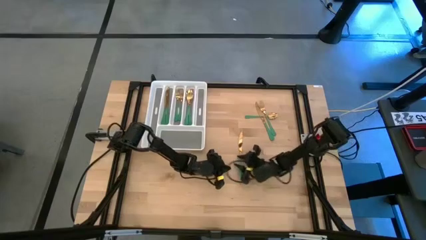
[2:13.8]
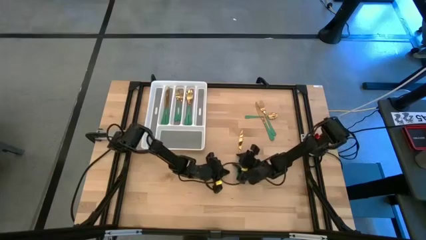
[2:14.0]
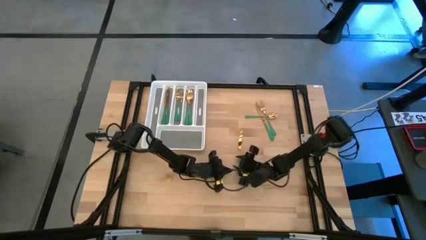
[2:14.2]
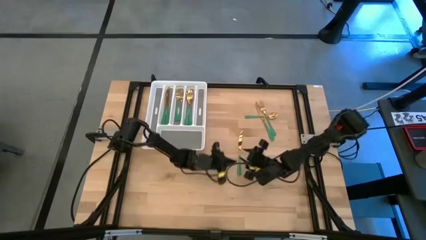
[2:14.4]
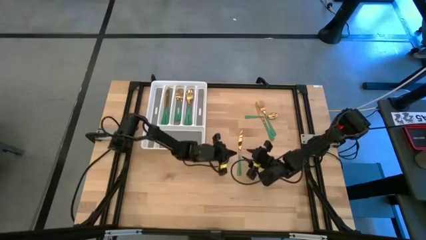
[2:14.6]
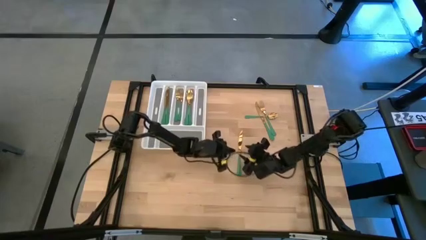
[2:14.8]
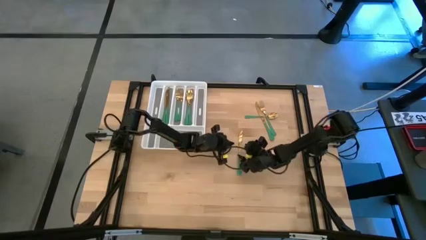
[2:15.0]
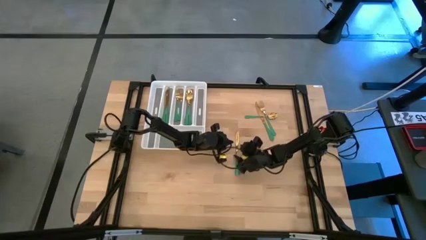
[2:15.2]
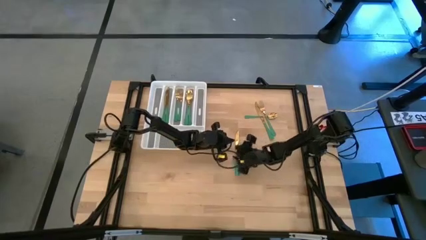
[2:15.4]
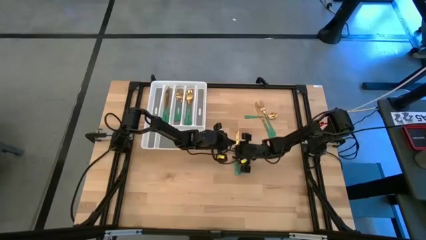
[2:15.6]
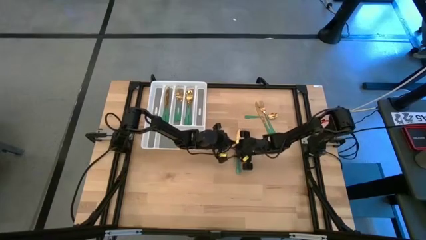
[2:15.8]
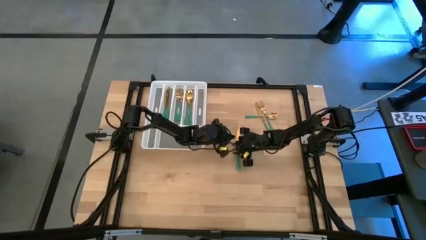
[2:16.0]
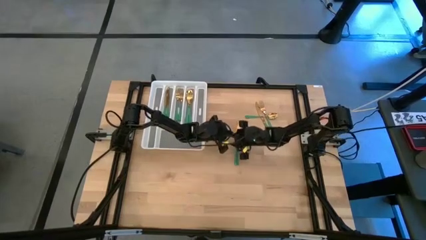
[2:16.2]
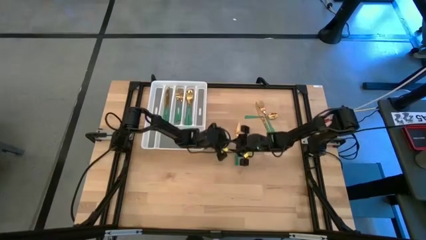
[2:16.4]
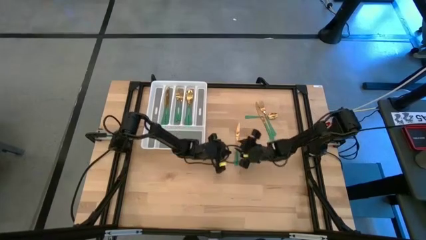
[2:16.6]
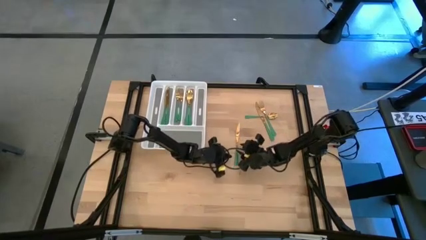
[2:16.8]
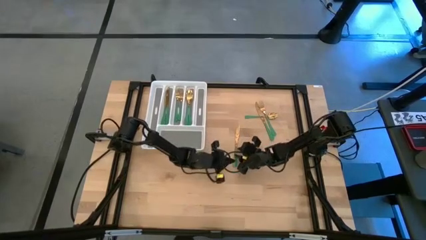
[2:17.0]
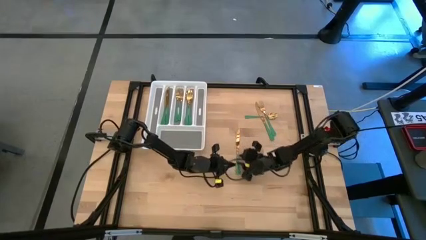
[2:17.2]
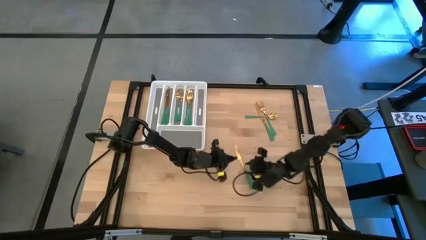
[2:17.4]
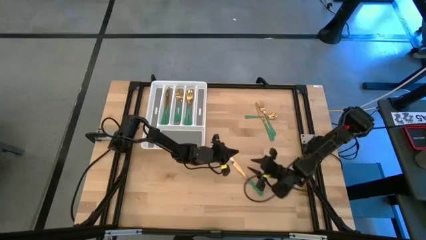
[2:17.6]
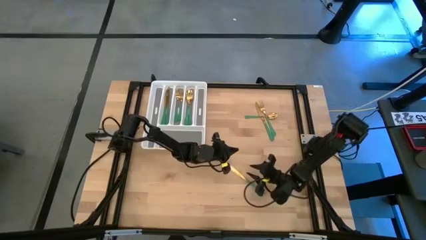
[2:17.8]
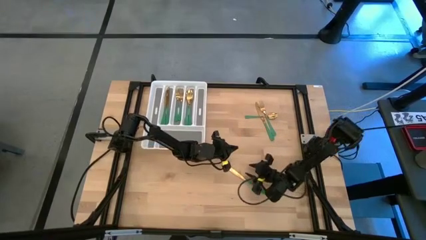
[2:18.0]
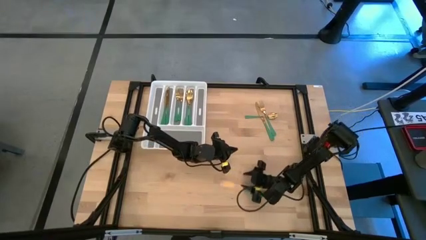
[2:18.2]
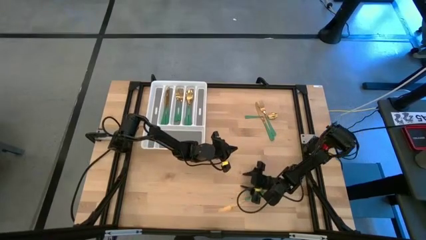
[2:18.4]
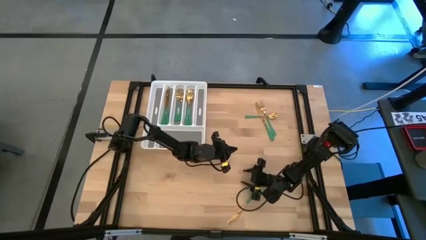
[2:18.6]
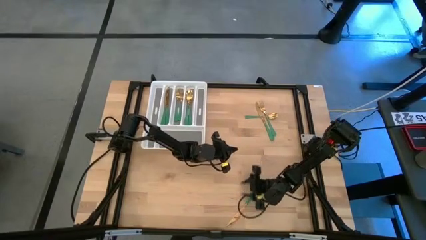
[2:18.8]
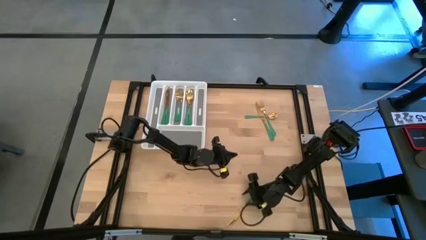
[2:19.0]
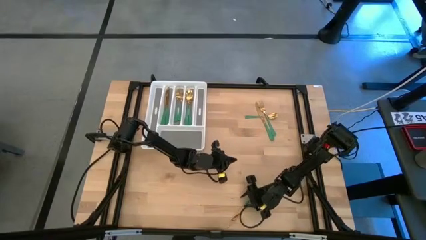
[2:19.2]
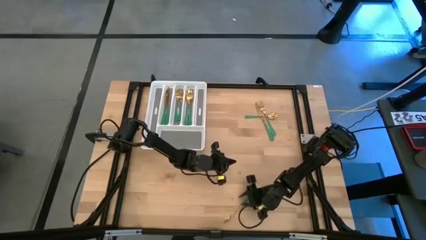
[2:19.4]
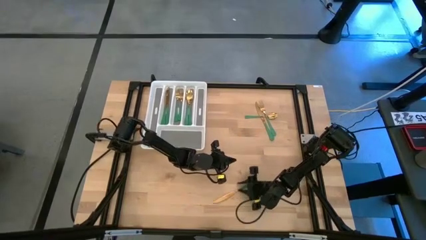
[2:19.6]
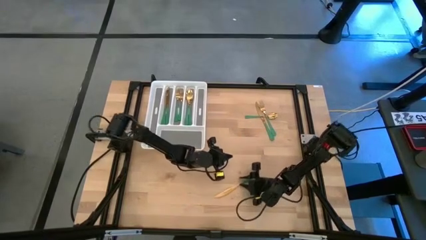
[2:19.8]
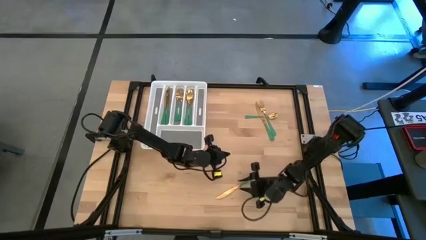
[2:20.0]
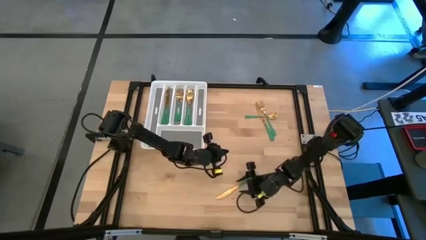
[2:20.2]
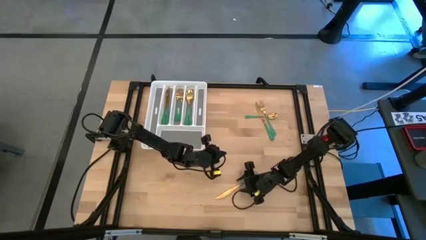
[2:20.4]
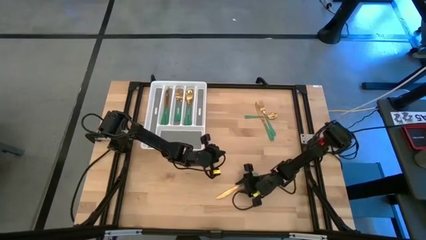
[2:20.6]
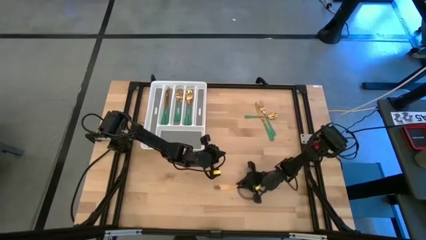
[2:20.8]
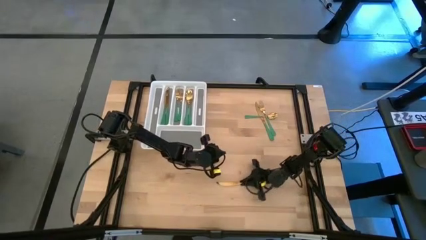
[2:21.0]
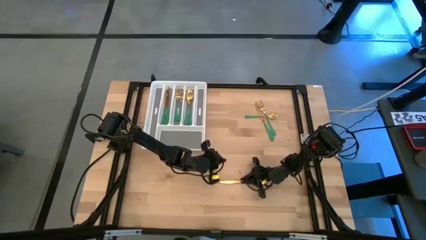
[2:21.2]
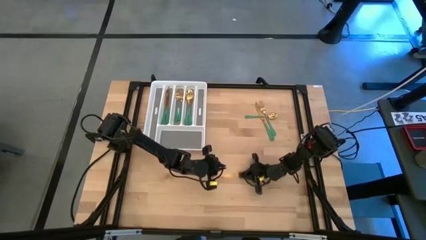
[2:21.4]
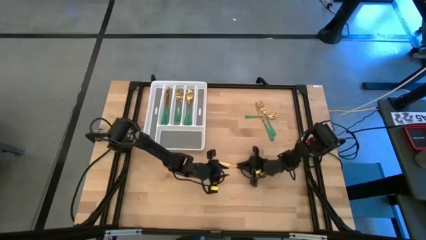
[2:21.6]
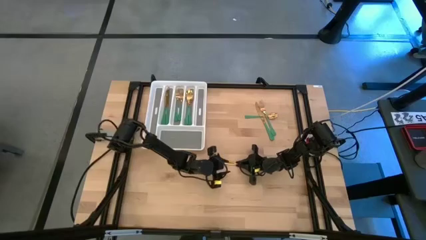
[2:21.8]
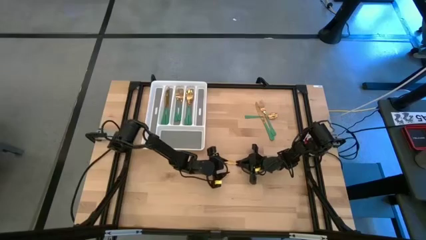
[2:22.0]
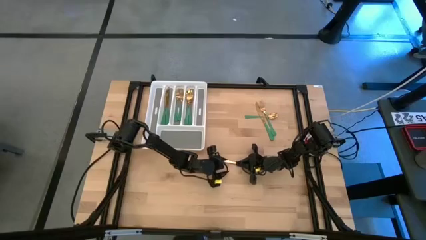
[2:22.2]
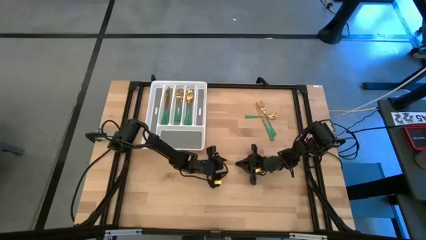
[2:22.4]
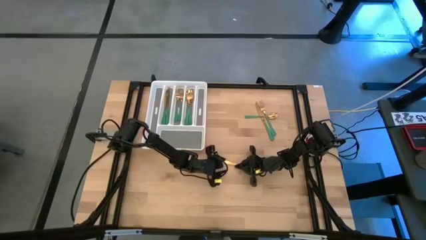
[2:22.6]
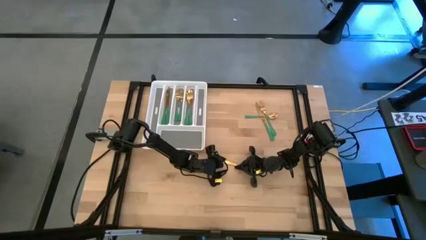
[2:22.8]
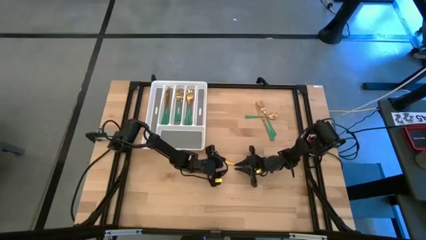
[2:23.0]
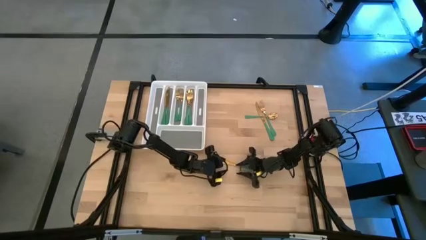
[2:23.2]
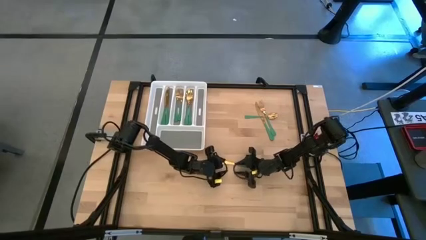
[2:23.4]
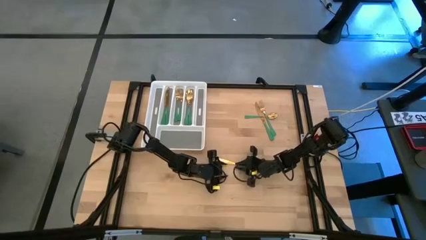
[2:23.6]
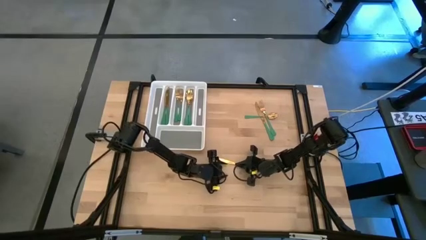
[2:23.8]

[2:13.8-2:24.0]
Task: Sort silverware
Put the green knife into the white cutlery tray

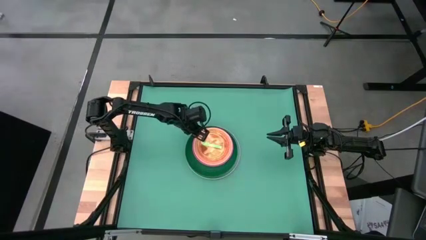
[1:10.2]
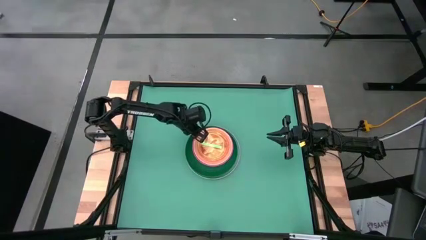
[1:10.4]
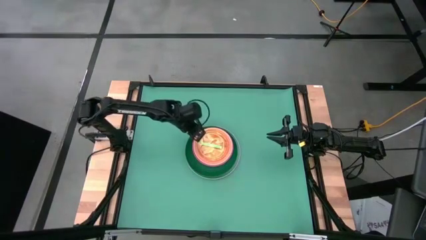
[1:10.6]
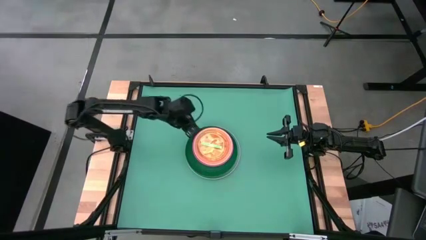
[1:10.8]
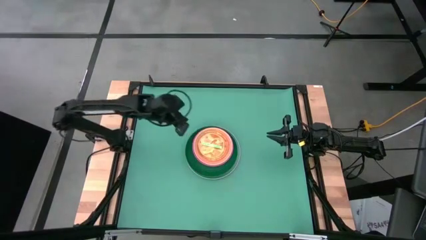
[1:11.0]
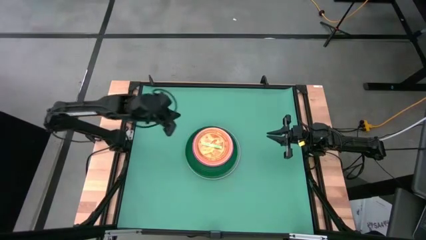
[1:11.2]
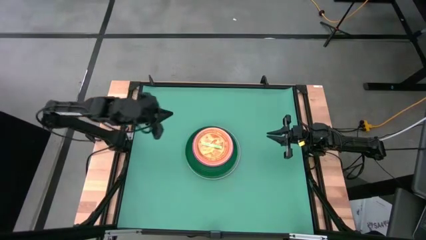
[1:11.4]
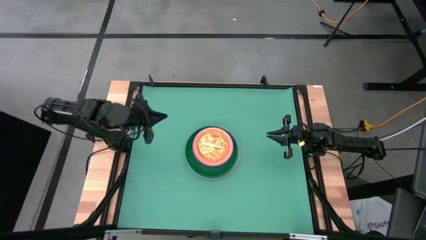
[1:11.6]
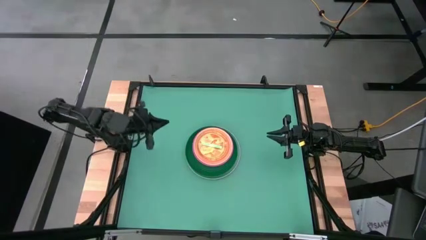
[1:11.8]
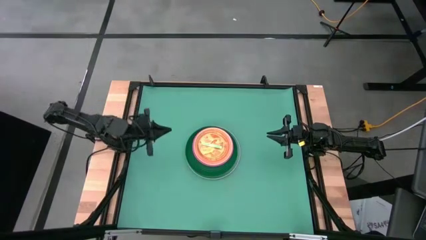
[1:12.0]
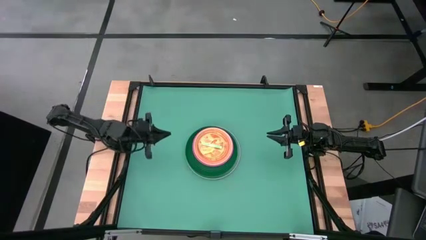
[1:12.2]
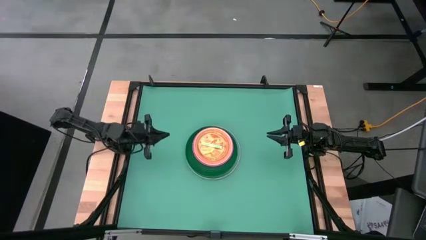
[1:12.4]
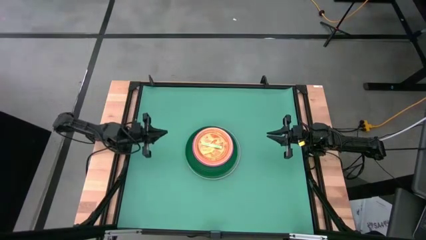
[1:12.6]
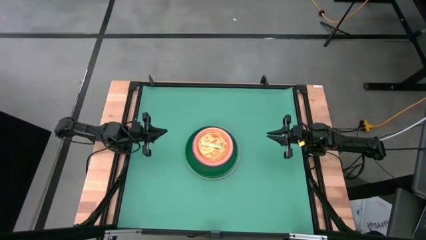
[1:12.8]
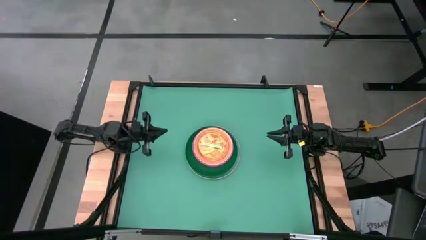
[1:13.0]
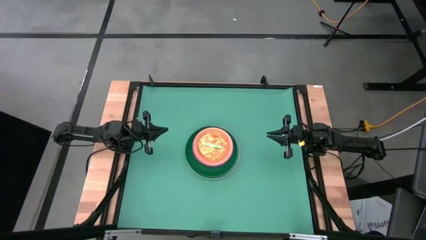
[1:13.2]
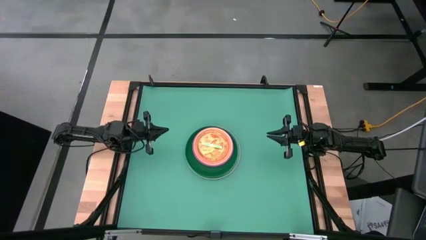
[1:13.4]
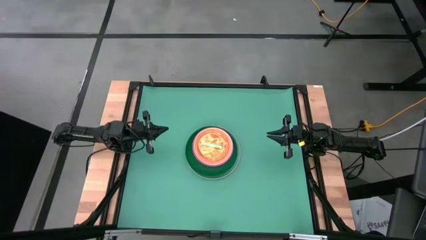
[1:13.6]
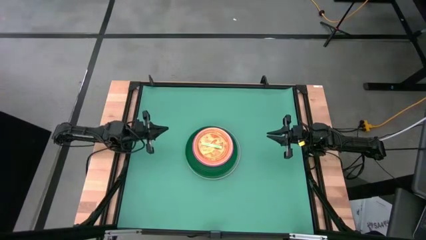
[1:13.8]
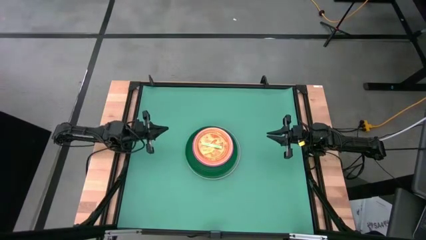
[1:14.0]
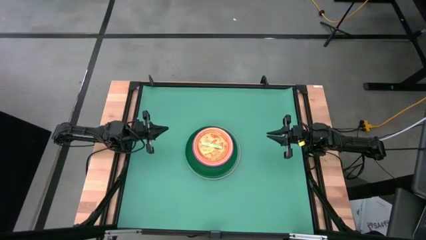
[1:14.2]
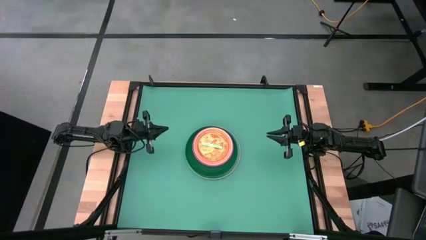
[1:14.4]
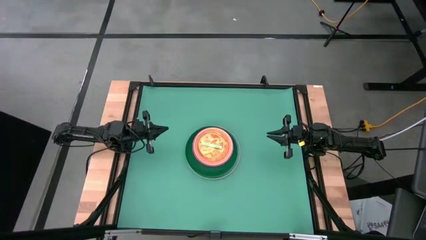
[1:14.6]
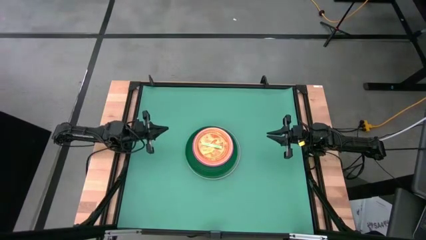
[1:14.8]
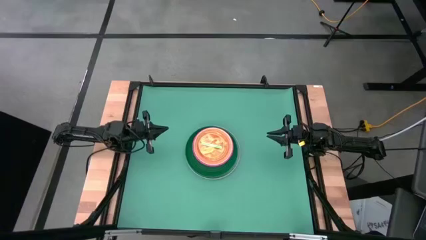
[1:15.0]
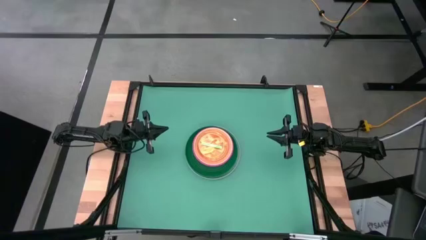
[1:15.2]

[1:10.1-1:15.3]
Task: Stack plastic plates
Return to Home Position
